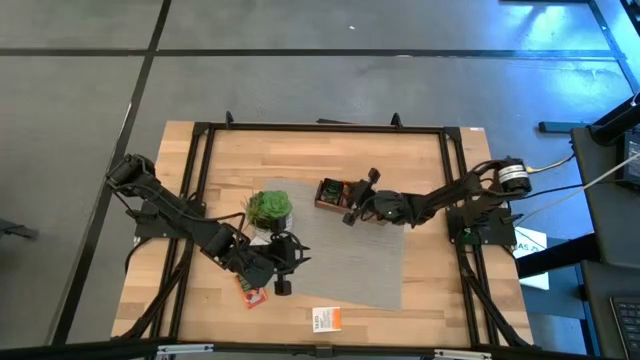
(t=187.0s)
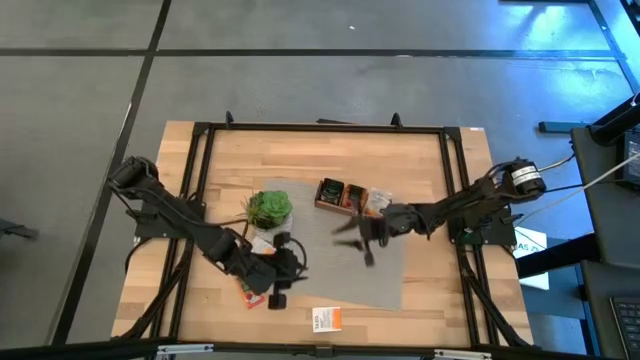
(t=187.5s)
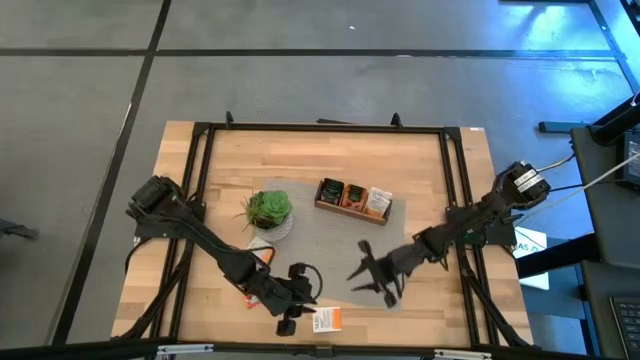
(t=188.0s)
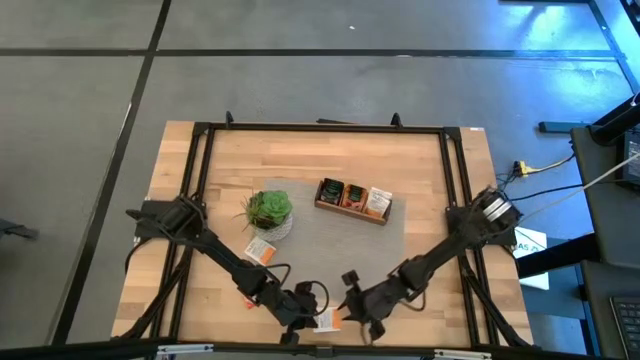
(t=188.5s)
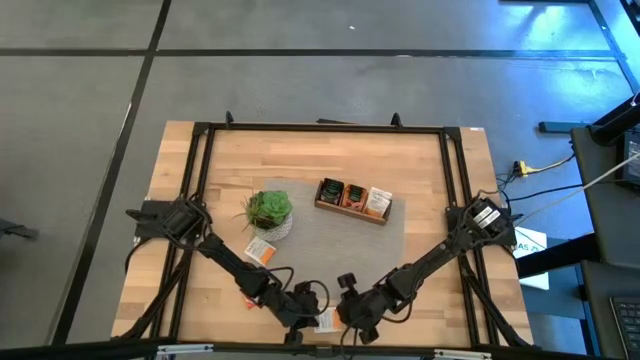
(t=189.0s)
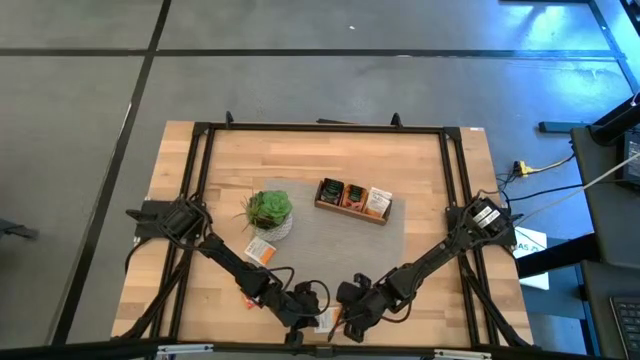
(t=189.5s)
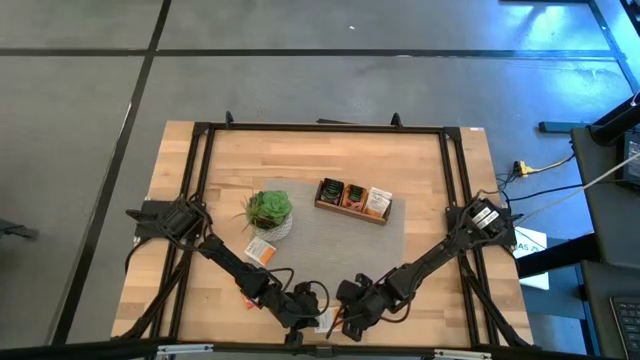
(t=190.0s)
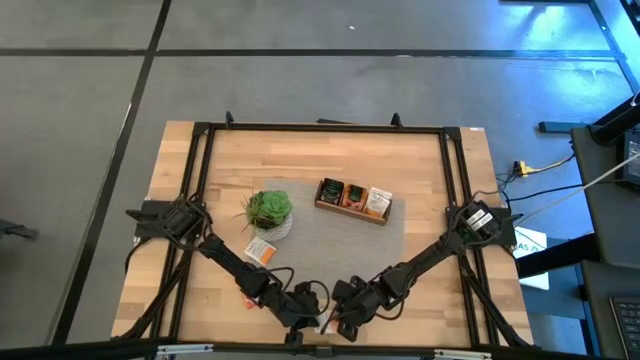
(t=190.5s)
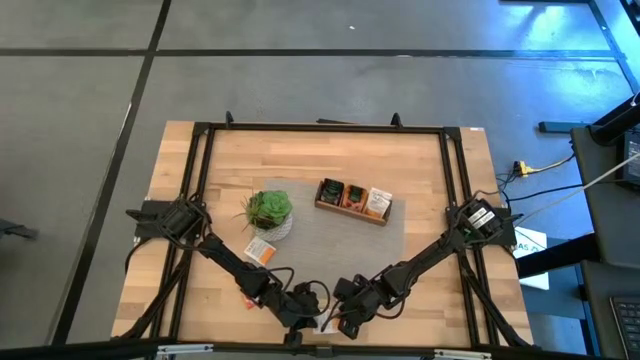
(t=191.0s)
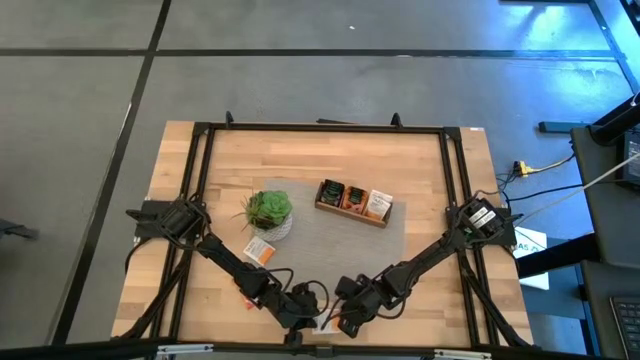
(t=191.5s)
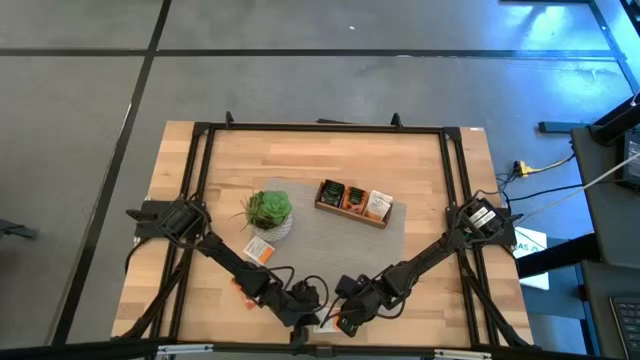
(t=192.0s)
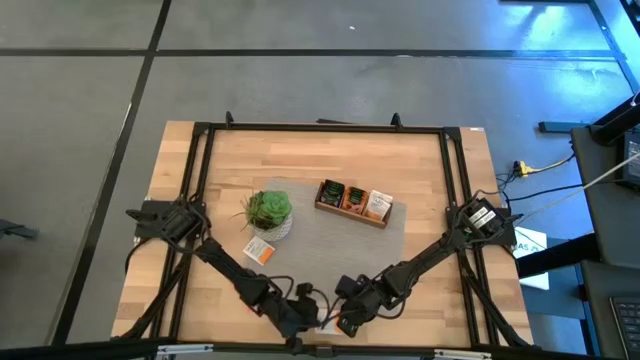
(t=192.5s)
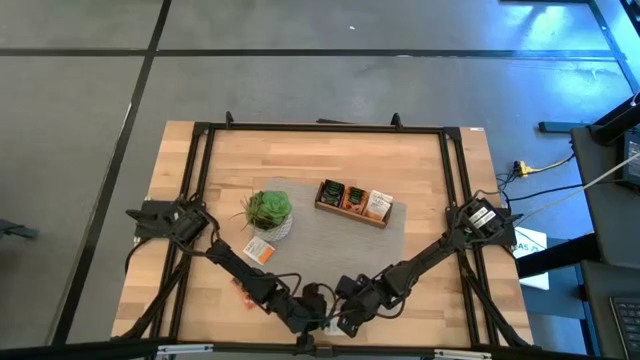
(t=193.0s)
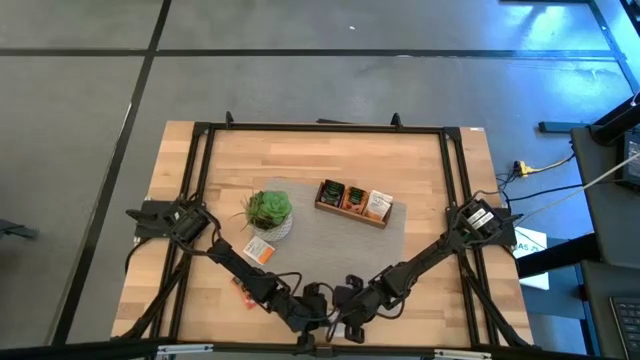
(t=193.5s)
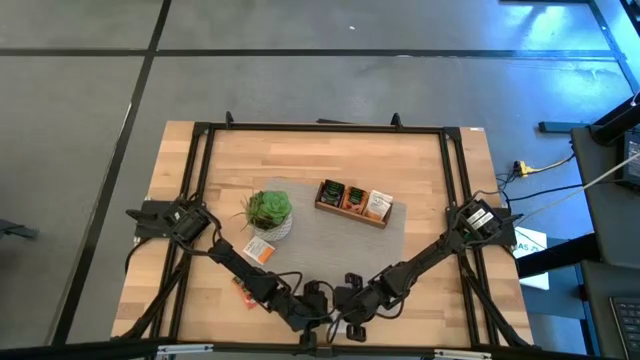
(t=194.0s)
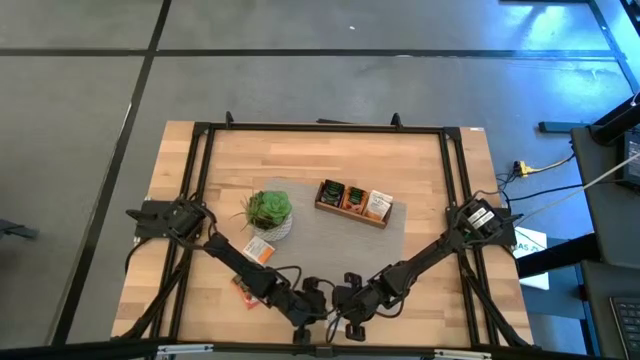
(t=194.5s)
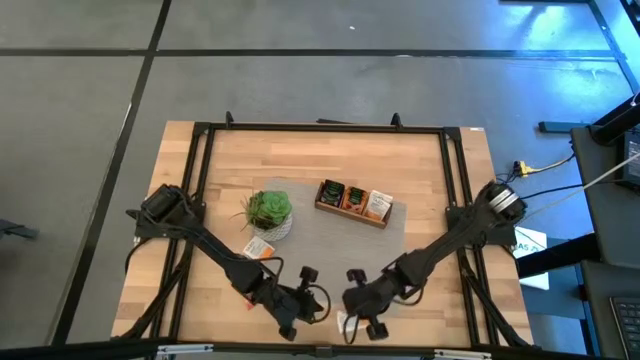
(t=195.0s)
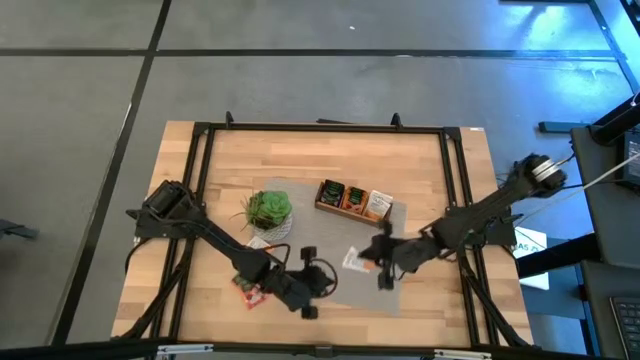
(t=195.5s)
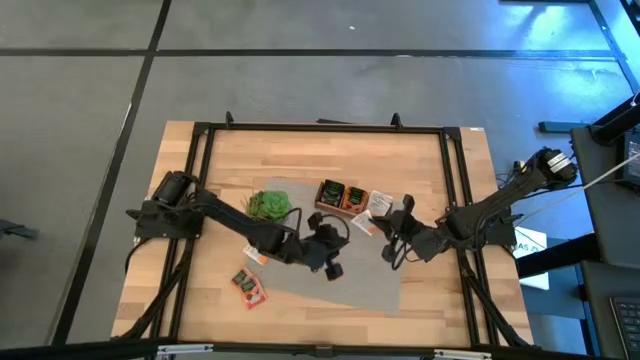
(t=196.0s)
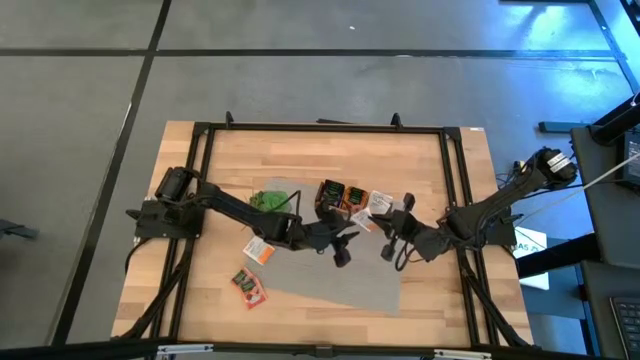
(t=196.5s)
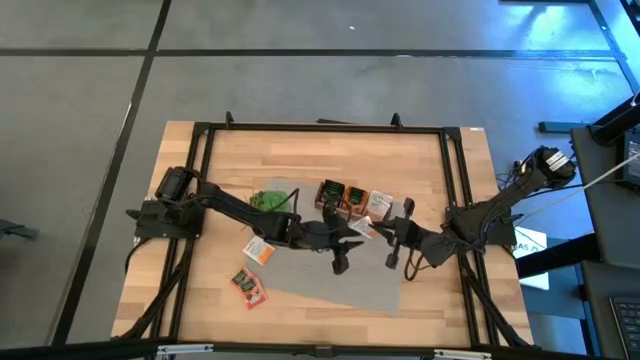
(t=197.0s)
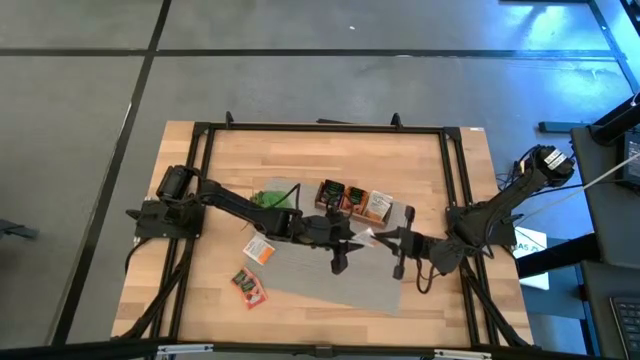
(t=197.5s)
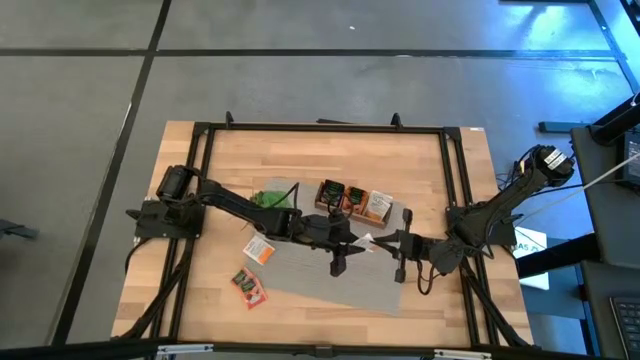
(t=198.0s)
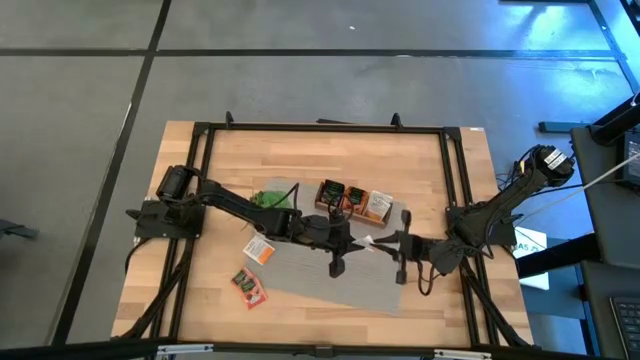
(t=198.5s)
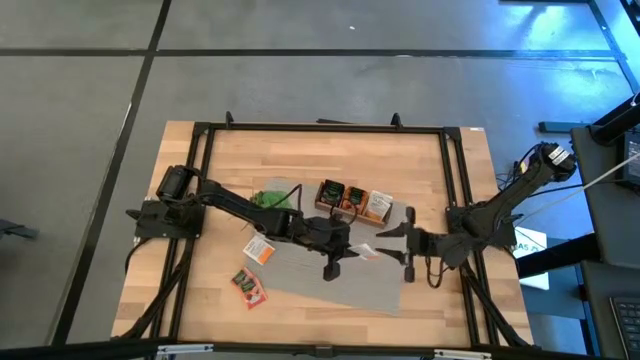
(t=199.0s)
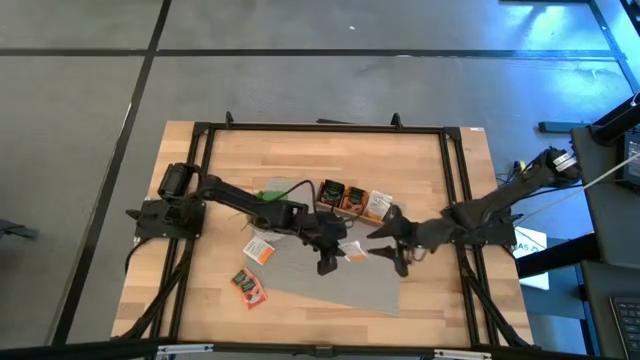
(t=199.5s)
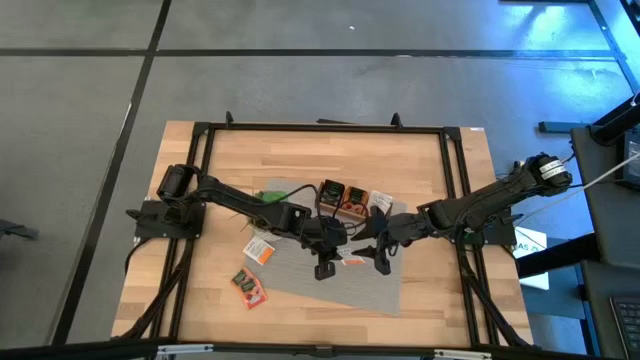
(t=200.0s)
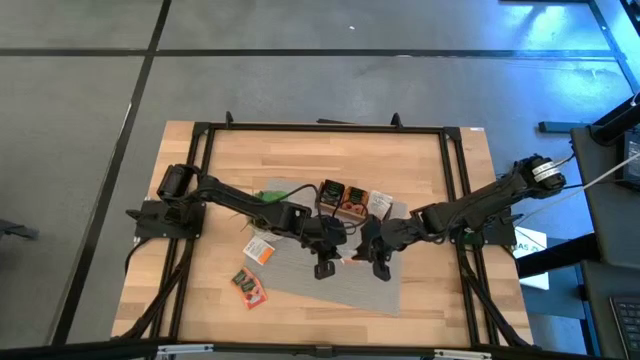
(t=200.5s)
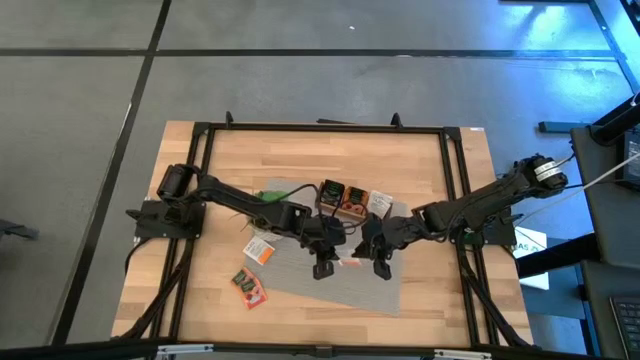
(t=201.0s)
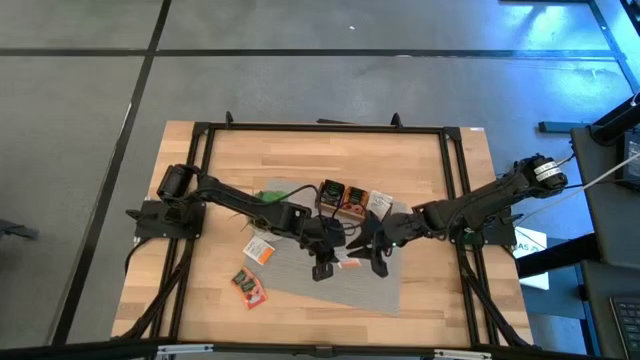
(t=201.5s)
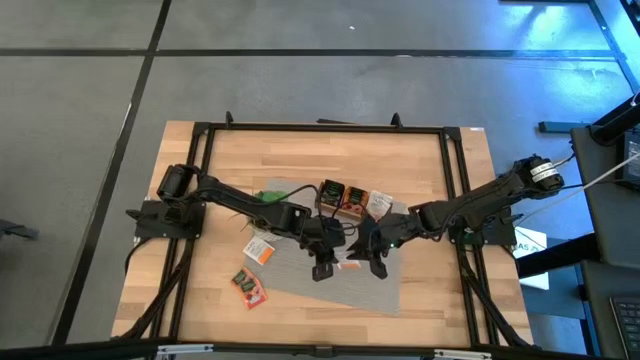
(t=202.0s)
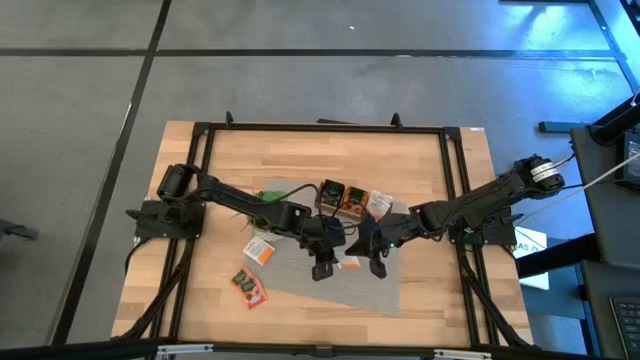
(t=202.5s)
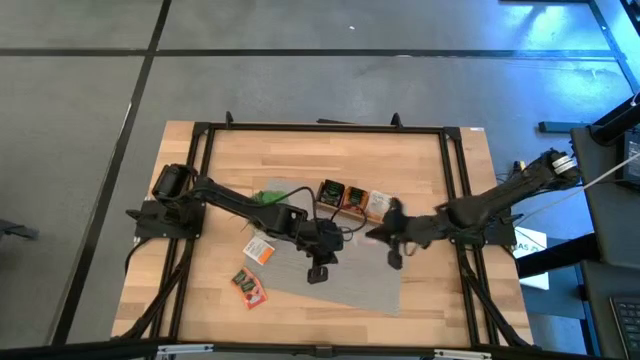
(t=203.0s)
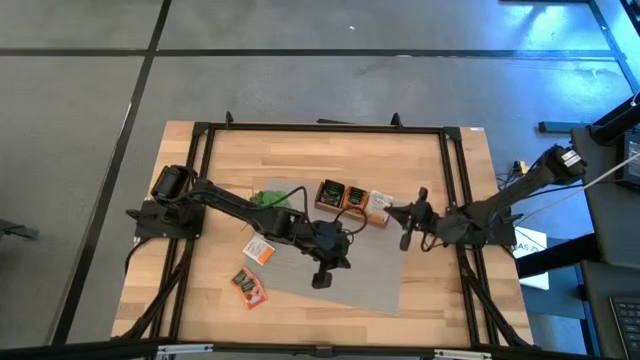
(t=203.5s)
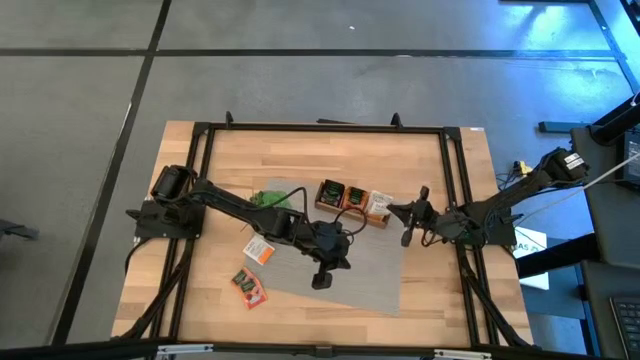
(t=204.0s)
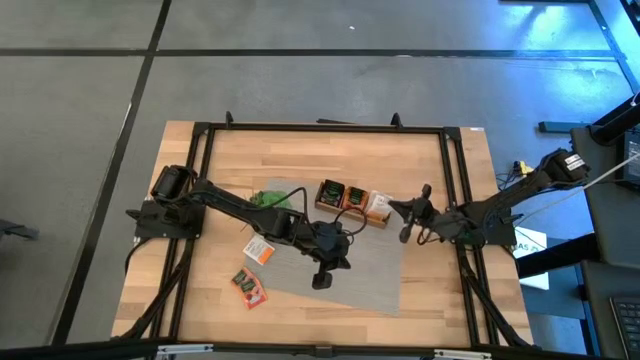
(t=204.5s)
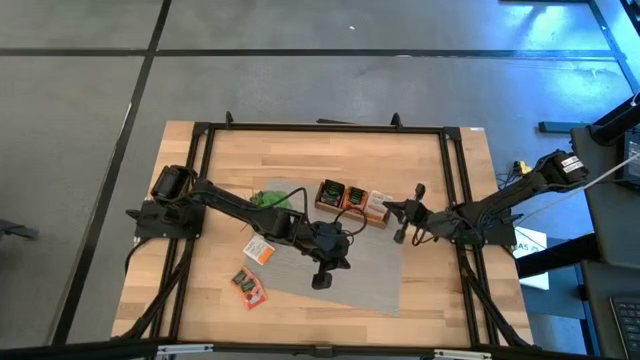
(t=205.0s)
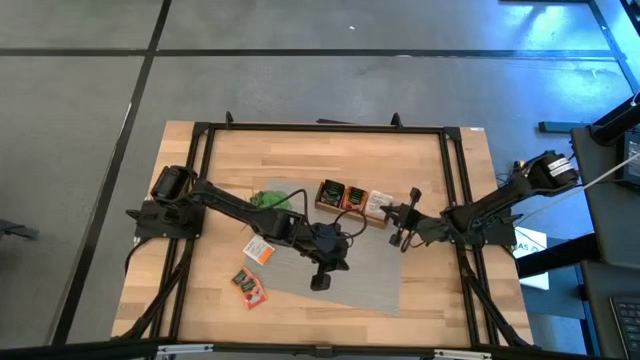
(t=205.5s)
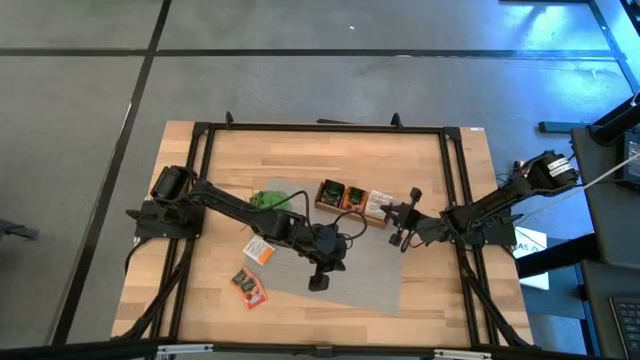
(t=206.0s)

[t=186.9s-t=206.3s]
Task: Pick & Place Tea
Put the white tea bag into the right section of the wooden organizer

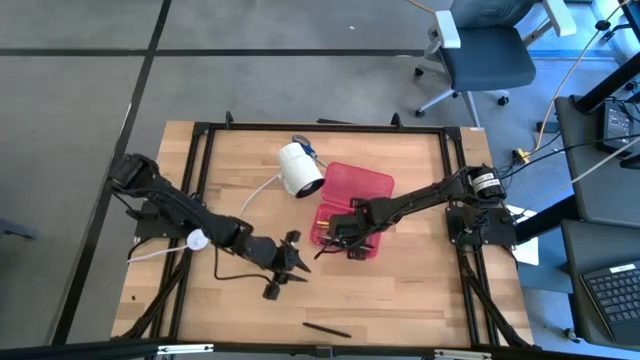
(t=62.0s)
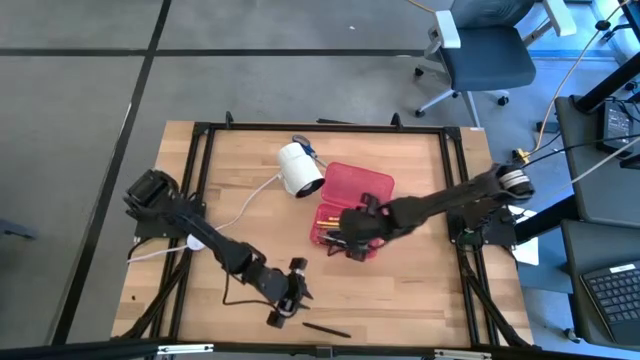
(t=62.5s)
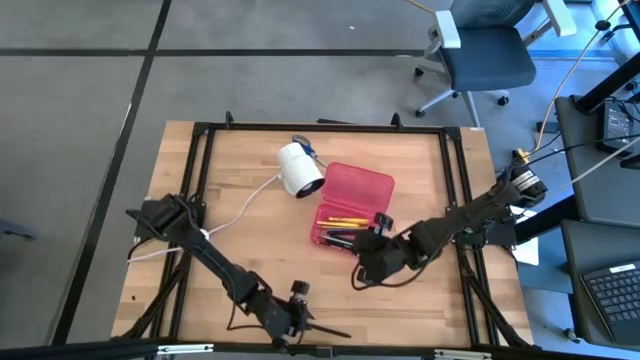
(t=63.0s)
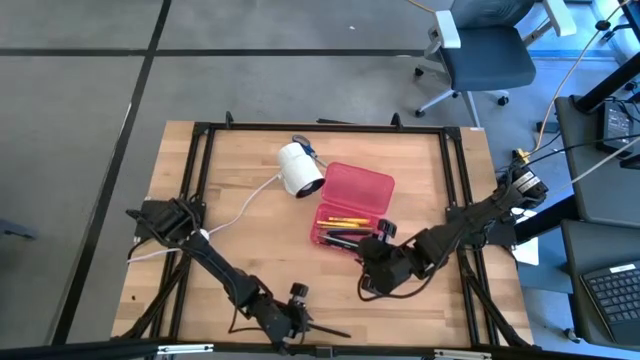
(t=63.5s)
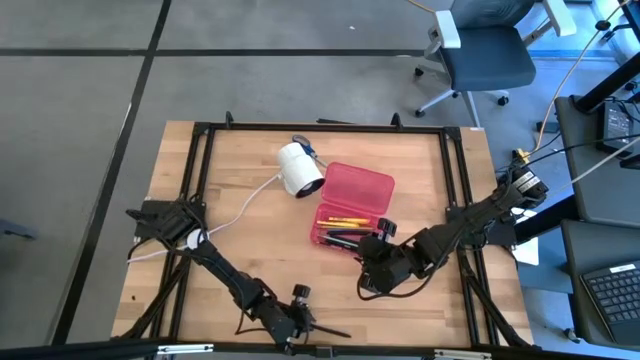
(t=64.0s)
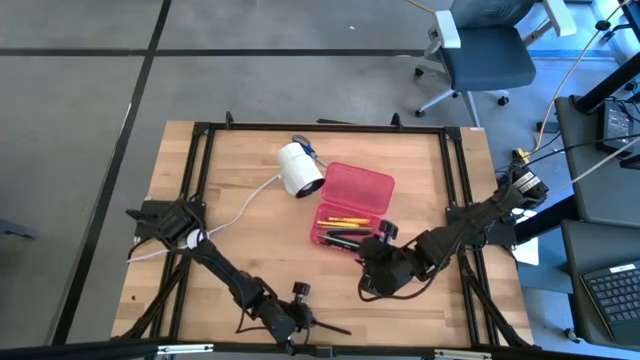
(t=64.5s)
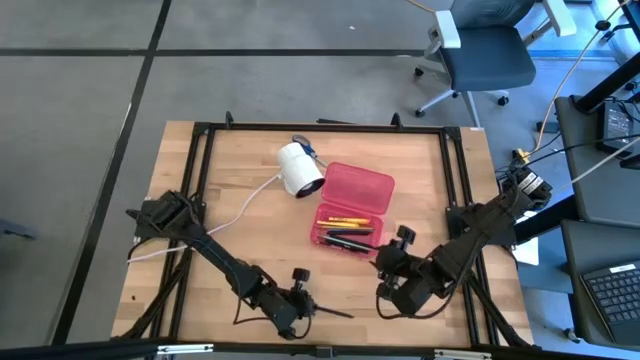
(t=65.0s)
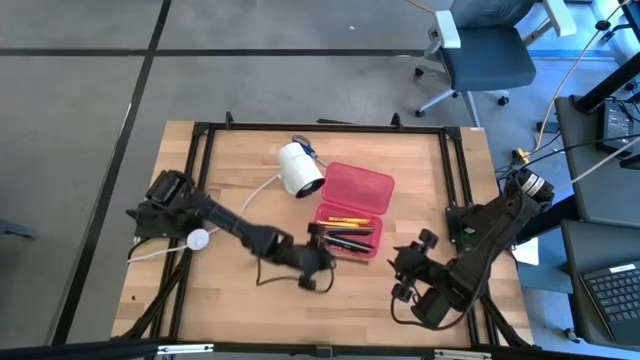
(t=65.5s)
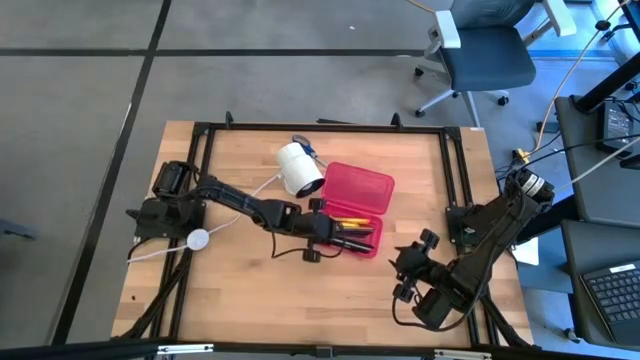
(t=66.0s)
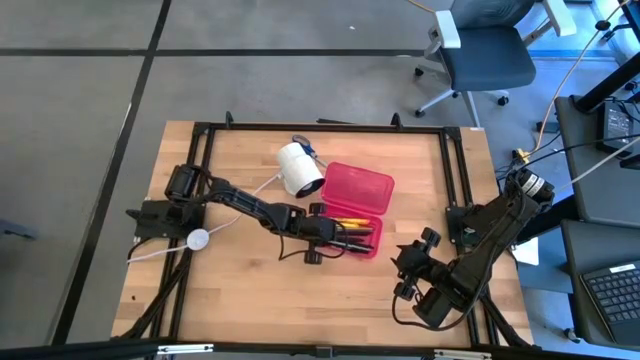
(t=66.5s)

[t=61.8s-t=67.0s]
Task: Pick & place school supplies into a supply box
Put the black pen into the pink supply box
